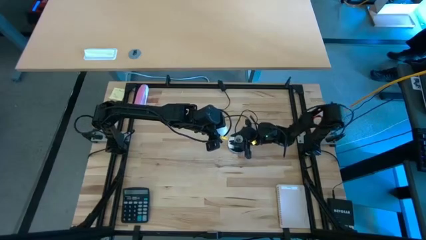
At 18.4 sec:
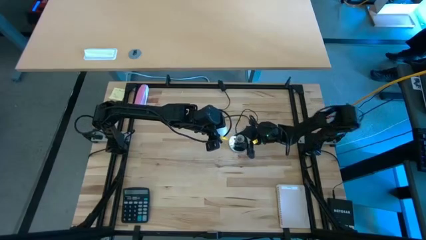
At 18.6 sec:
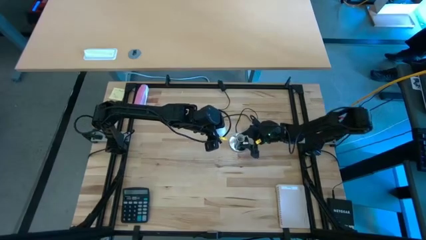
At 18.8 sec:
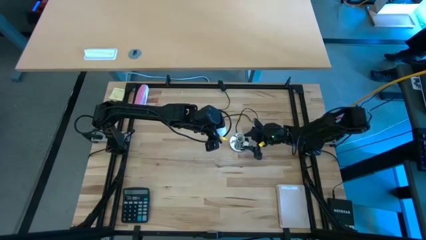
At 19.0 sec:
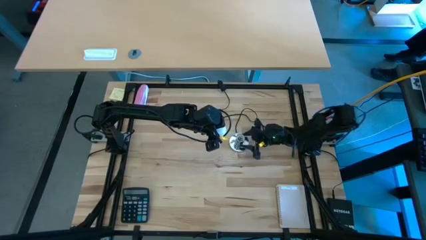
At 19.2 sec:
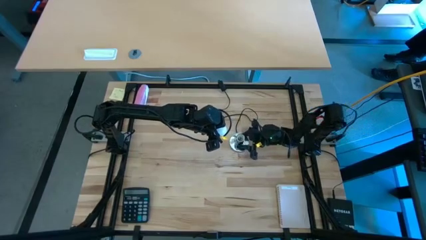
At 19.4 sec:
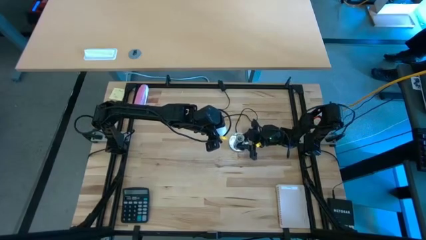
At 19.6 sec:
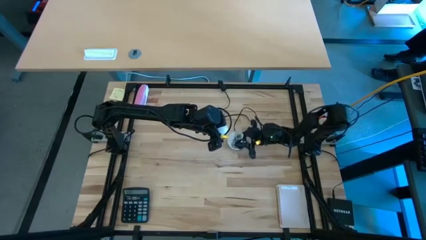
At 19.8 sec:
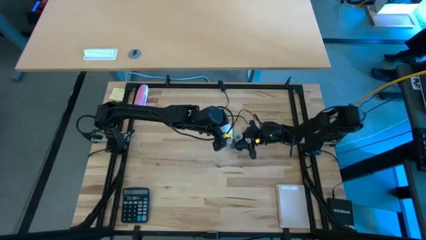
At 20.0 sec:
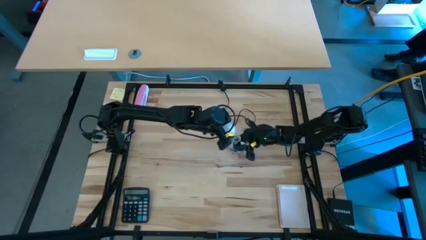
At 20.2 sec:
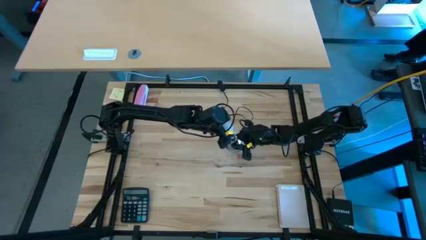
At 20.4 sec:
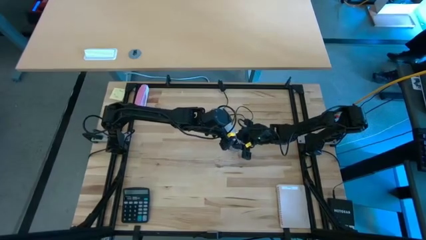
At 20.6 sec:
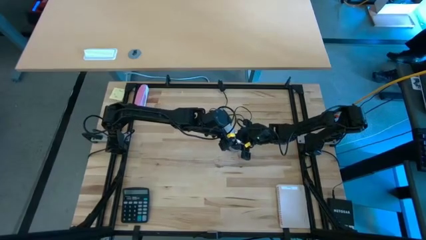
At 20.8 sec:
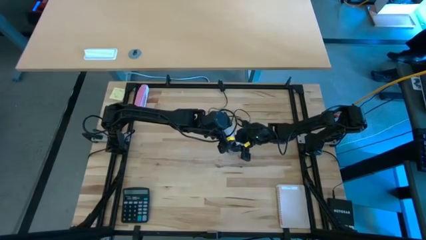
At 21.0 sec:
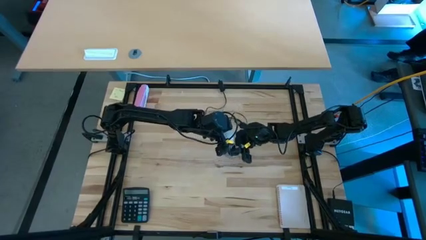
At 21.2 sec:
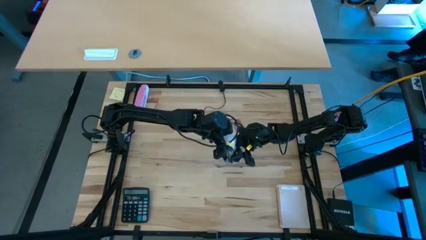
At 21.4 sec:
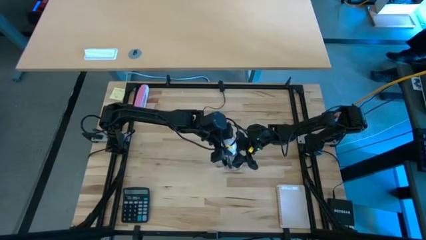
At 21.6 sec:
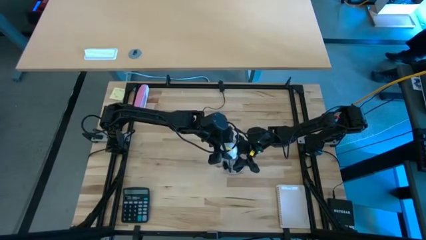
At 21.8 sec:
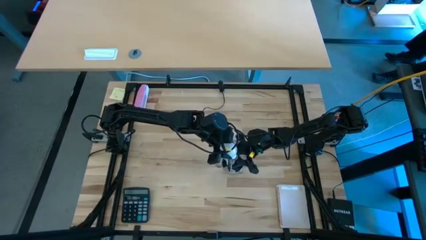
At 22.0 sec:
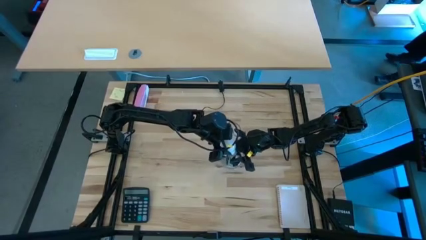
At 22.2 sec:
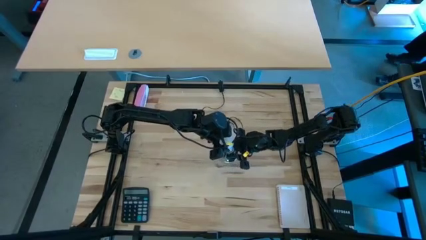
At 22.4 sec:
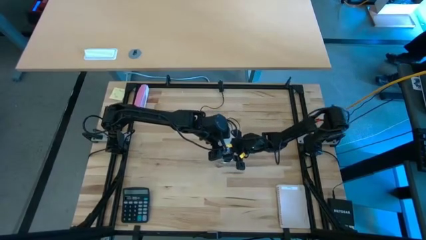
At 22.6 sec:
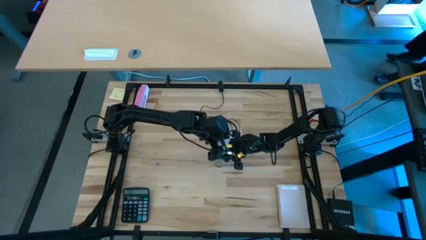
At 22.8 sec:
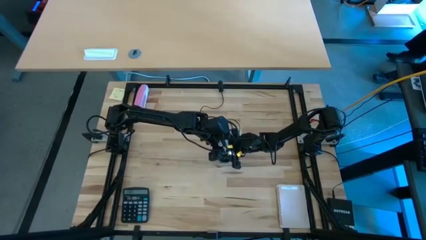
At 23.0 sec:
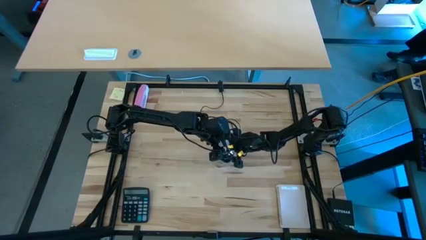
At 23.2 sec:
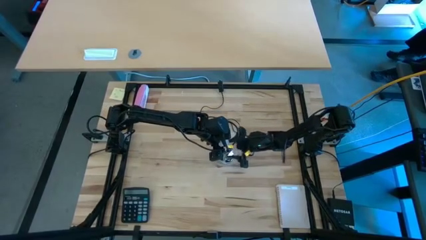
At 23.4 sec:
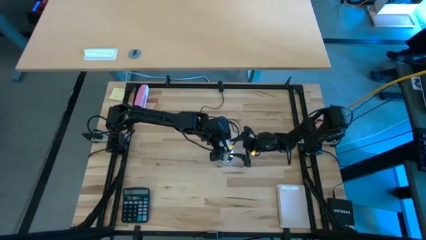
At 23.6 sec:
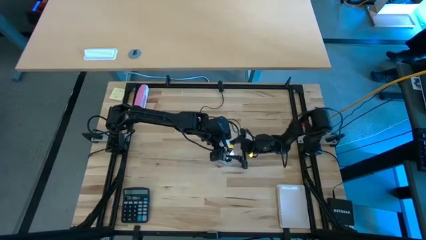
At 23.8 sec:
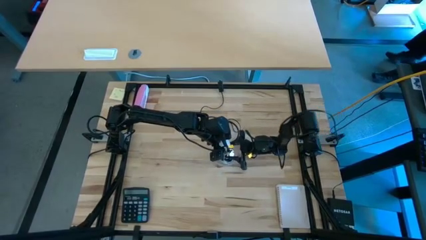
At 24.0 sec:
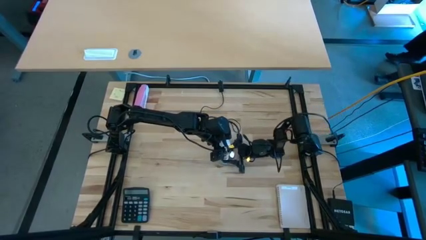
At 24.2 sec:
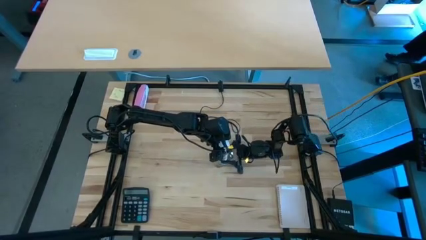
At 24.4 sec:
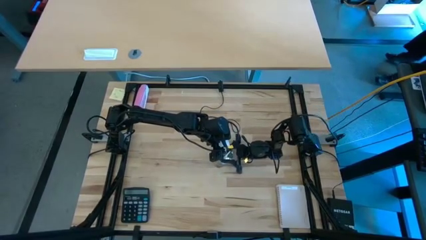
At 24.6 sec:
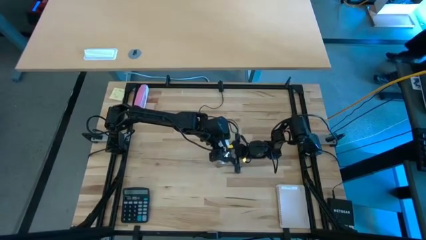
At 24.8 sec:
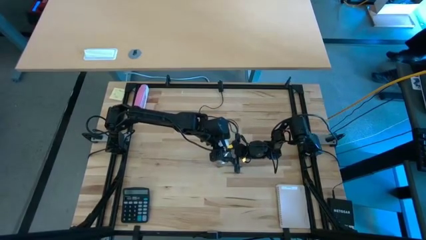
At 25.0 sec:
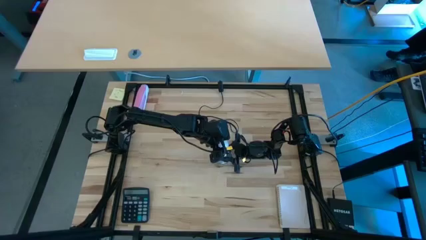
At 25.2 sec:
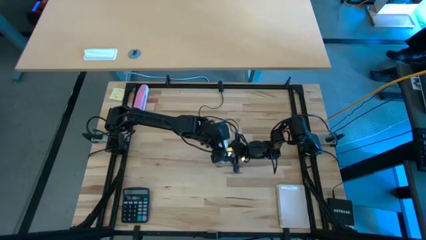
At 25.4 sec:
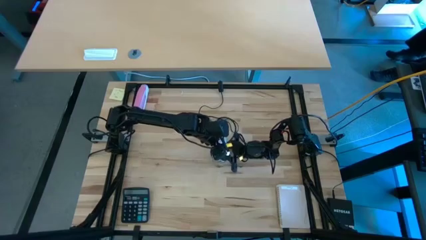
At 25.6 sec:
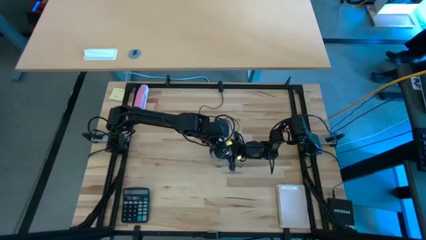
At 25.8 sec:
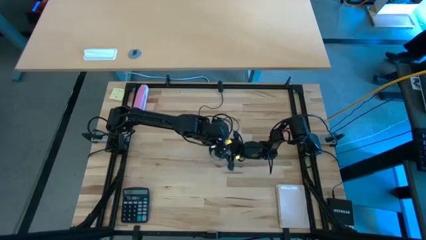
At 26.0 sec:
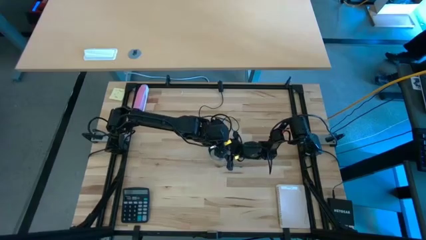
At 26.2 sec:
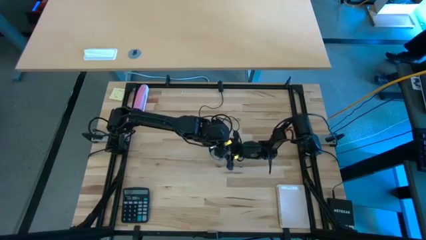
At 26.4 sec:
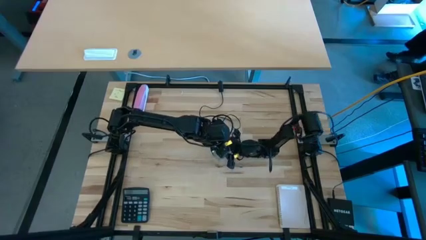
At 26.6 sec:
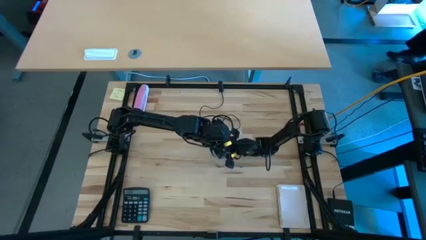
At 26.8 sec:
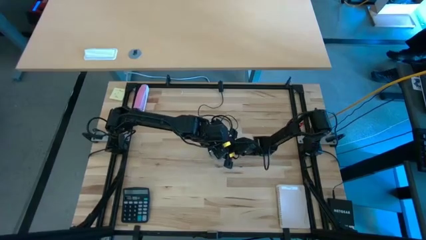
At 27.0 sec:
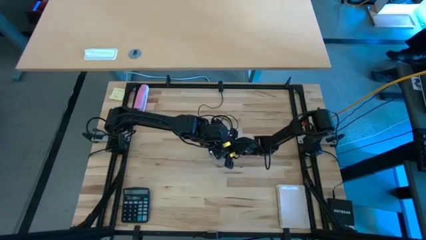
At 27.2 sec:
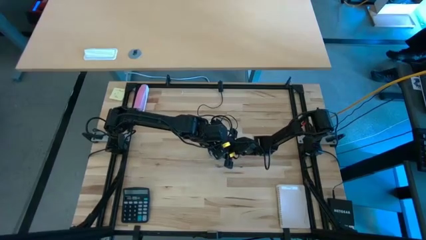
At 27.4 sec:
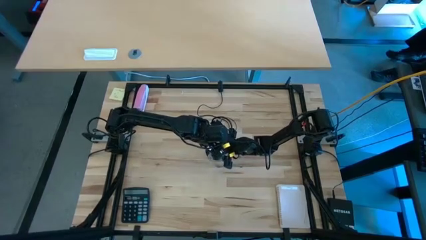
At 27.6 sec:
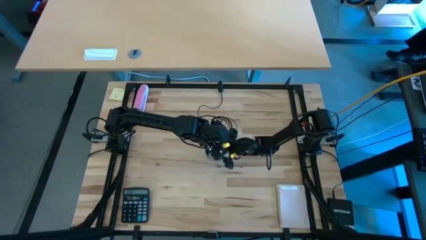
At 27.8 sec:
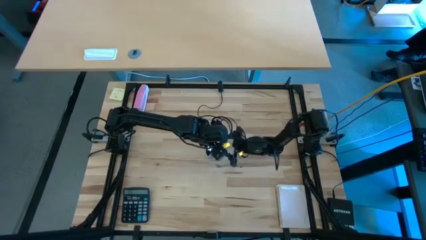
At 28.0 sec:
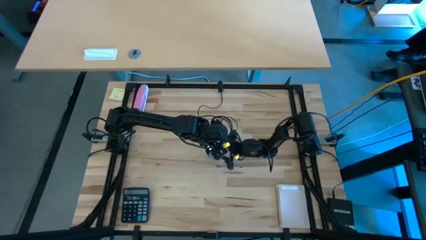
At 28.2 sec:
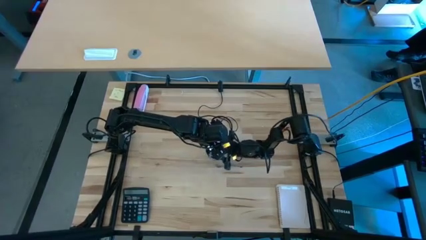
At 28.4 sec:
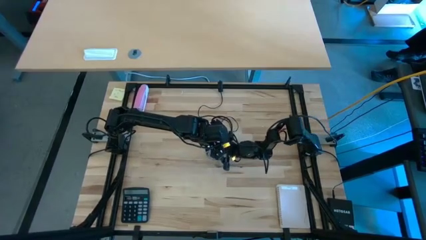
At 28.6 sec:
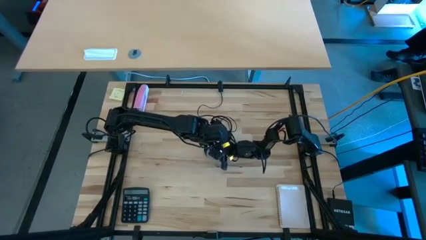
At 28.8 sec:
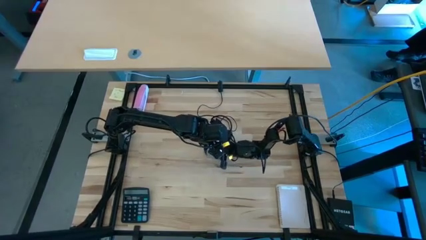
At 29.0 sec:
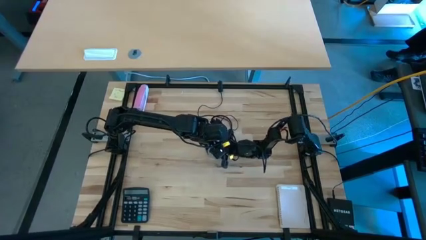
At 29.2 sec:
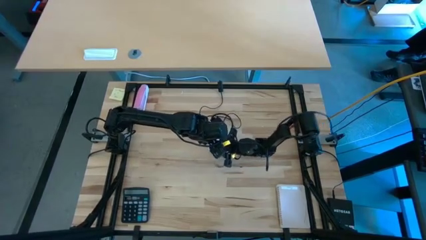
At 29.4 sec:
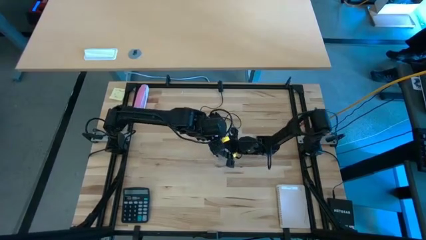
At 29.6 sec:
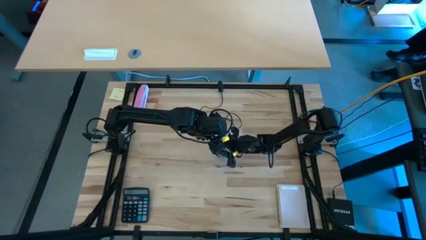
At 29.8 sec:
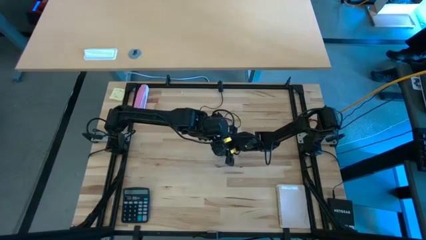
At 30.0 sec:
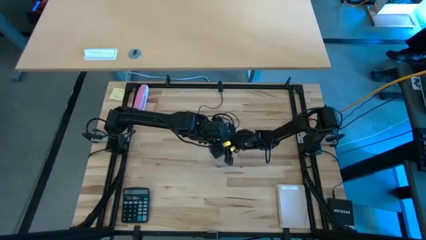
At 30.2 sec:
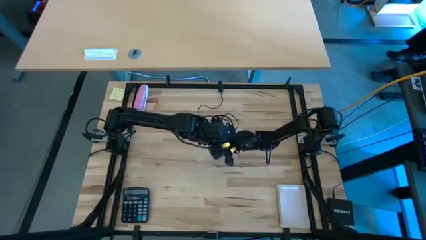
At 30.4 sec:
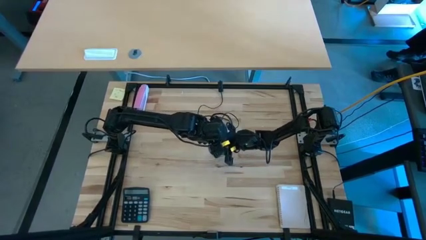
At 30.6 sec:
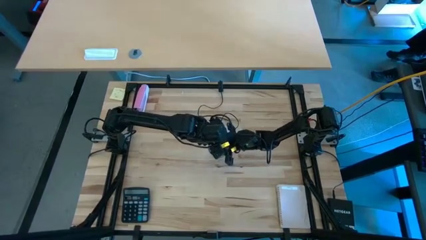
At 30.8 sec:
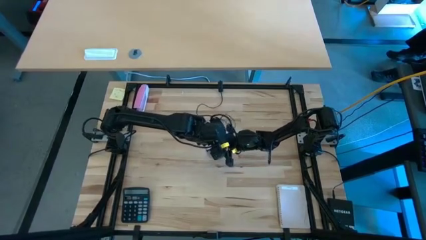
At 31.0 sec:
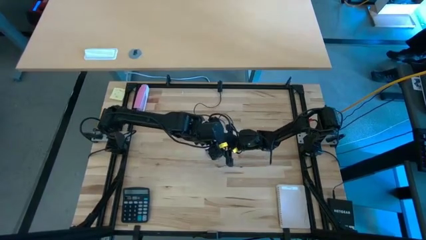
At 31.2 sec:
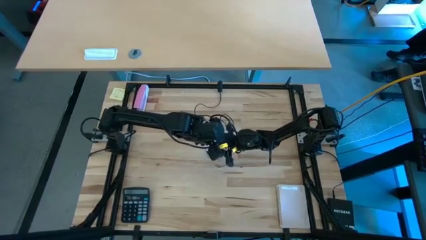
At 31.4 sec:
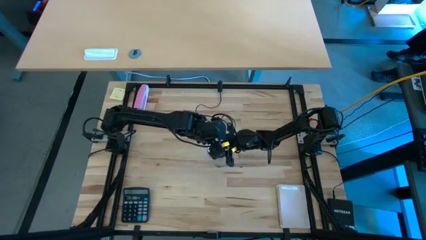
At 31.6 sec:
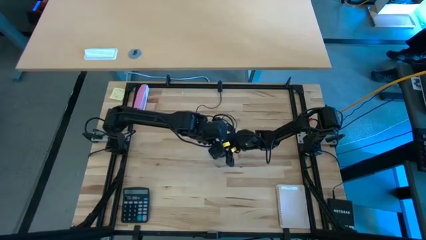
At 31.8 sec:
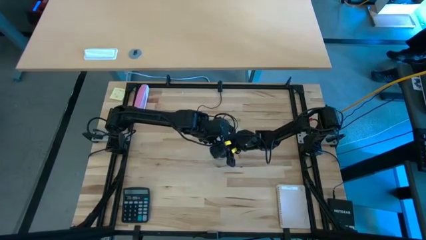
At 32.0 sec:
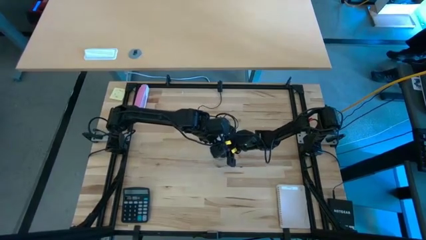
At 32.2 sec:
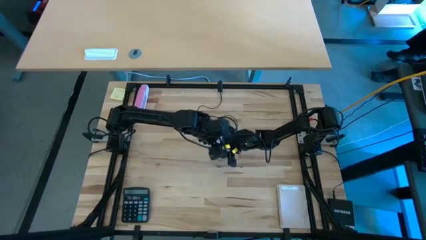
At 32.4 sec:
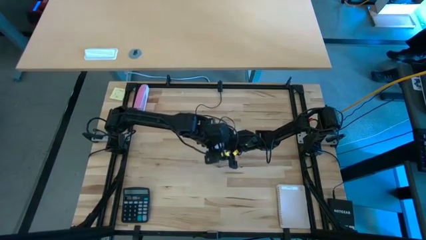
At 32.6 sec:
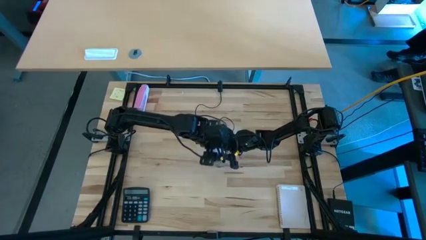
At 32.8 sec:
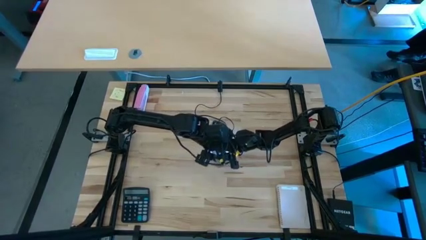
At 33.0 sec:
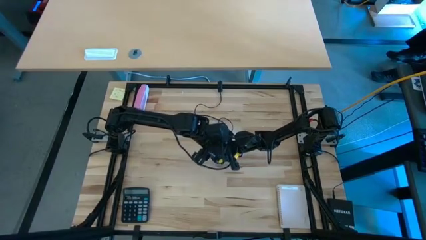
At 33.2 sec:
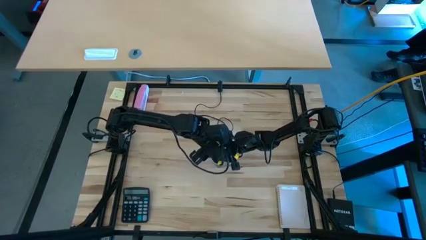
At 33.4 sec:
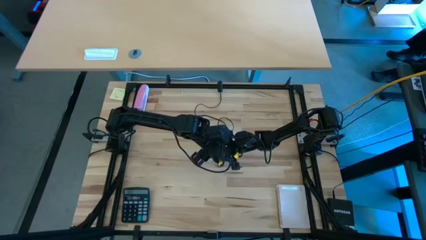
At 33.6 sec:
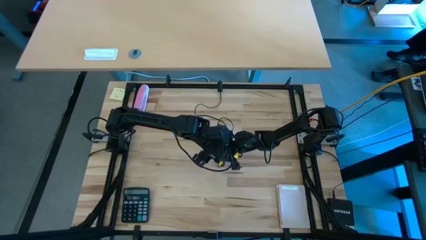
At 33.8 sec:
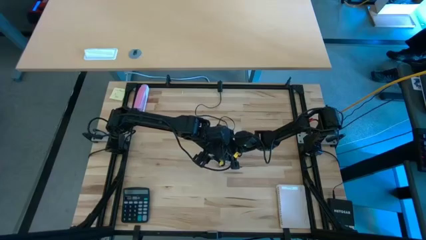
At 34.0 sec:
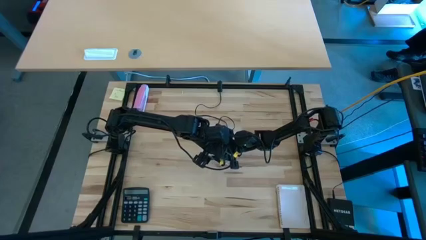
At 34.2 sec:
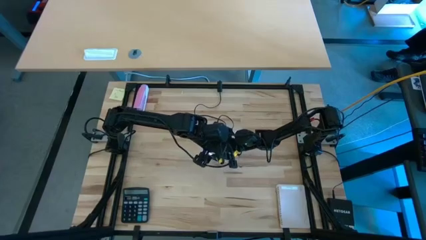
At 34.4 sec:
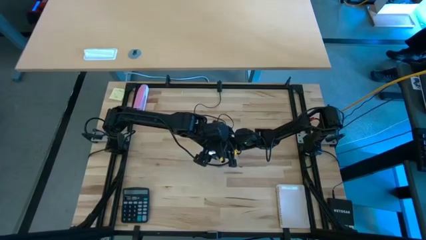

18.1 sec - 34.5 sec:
Task: Screw lightbulb
Insert the lightbulb into the lamp
